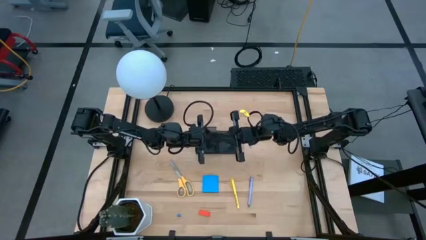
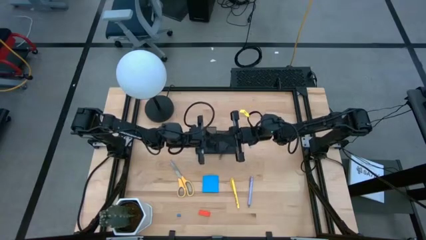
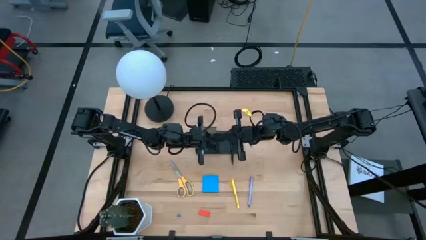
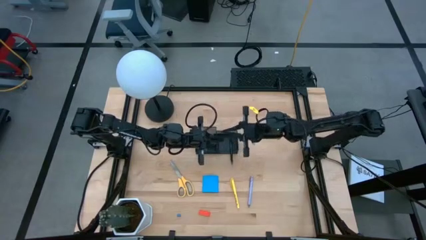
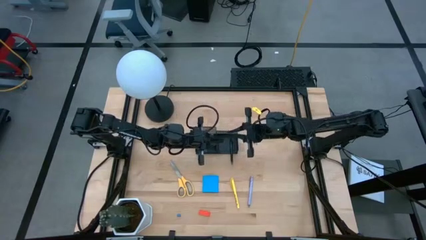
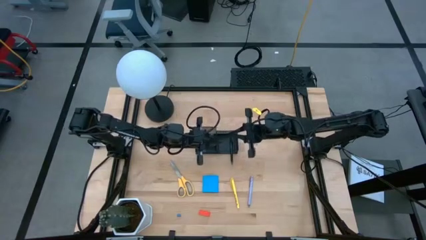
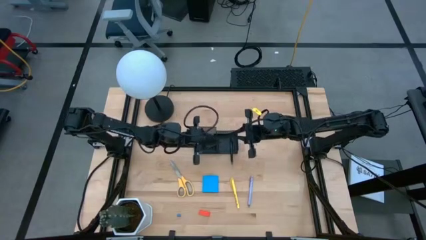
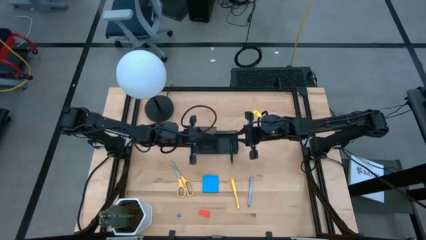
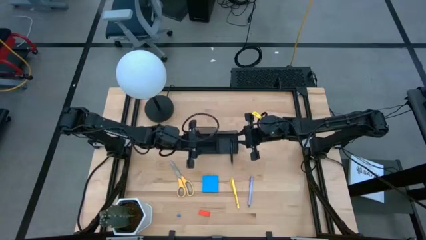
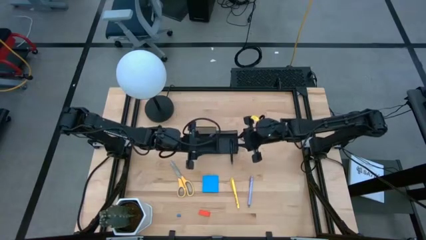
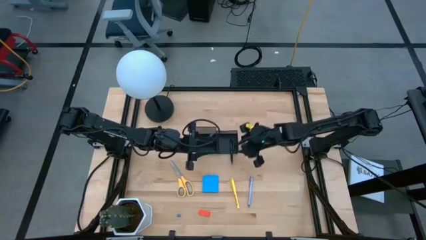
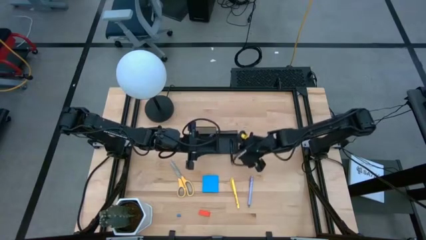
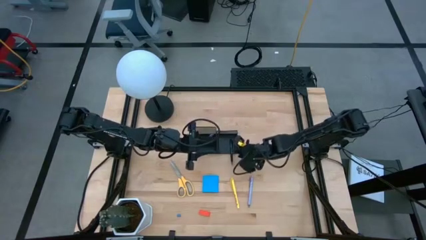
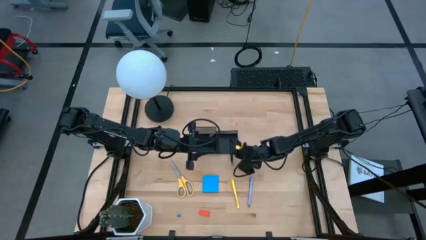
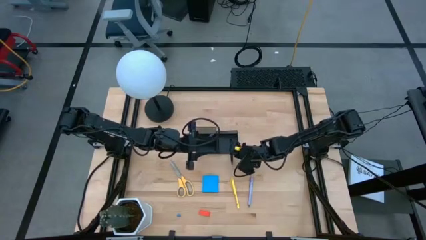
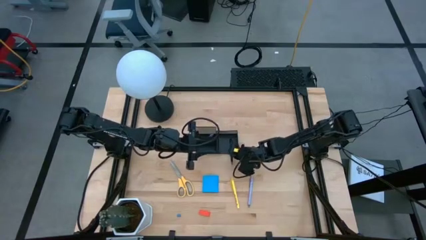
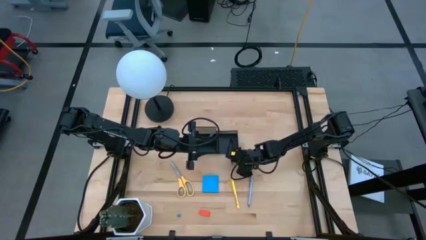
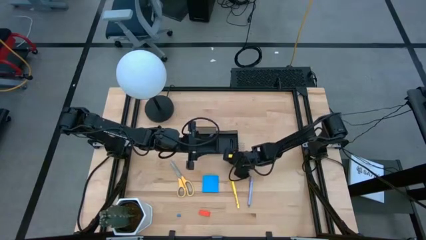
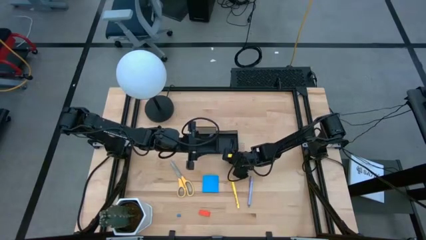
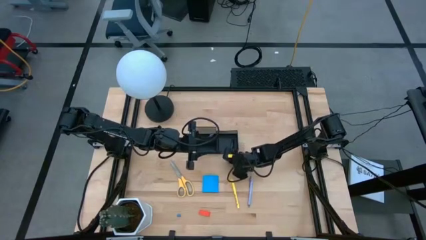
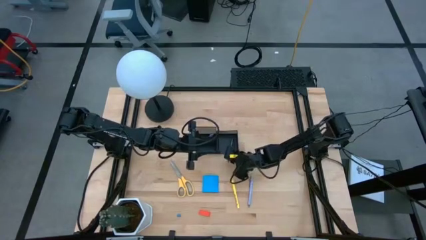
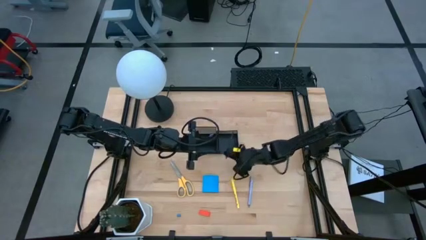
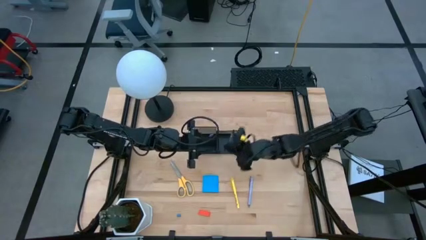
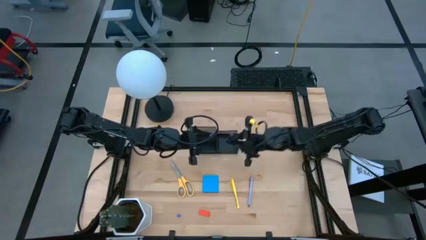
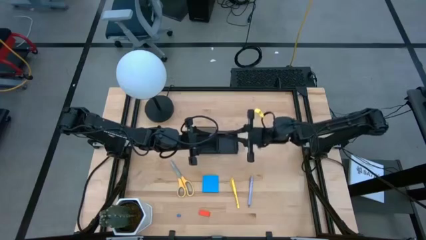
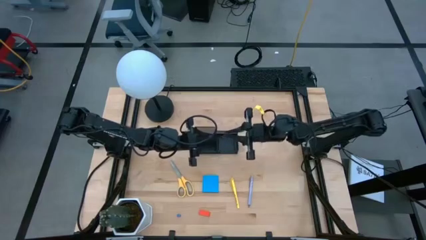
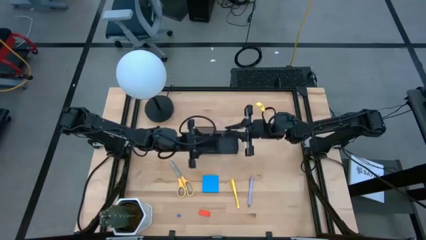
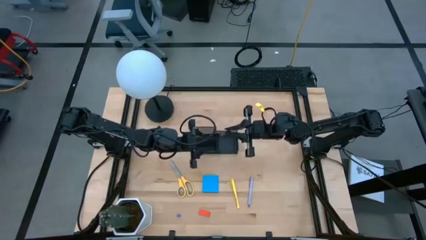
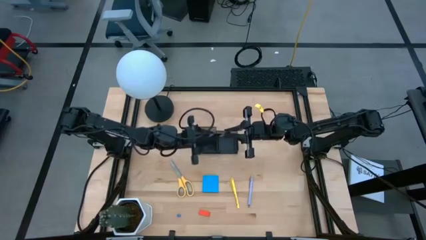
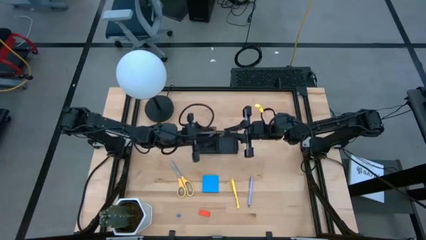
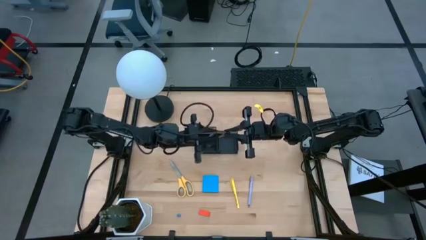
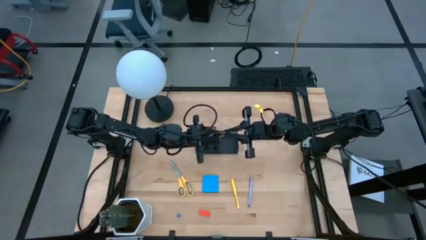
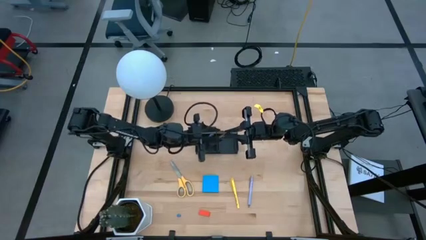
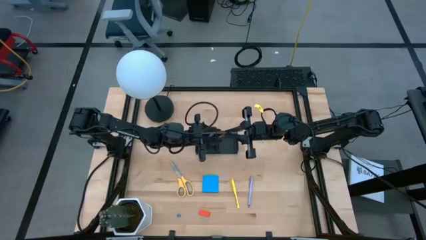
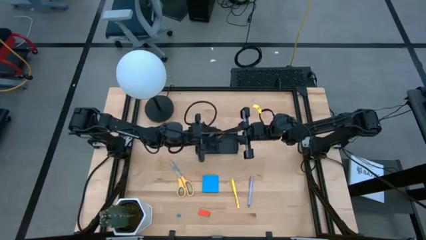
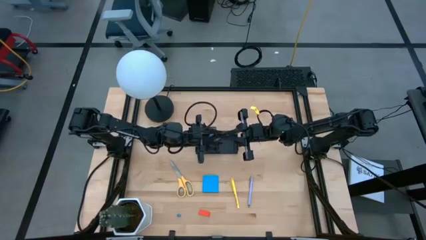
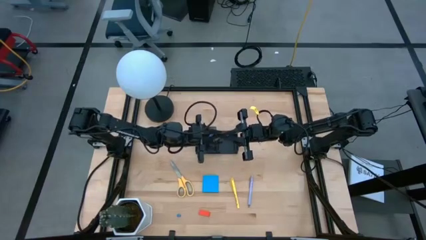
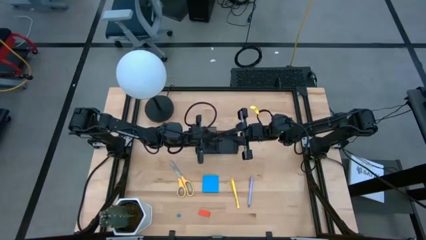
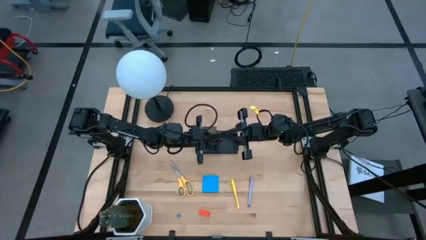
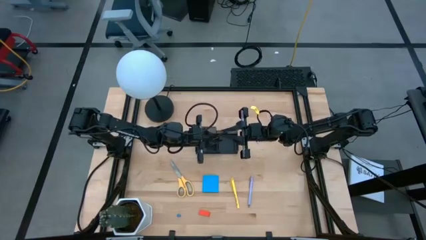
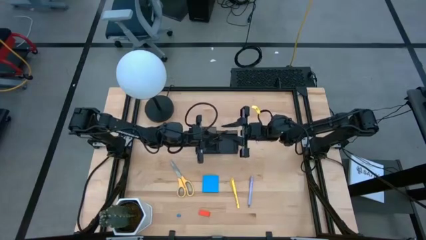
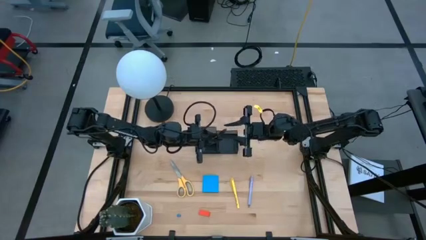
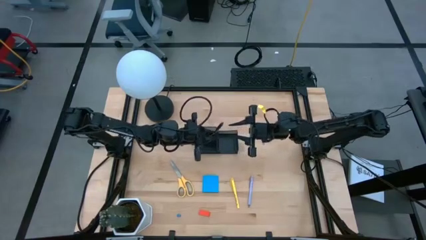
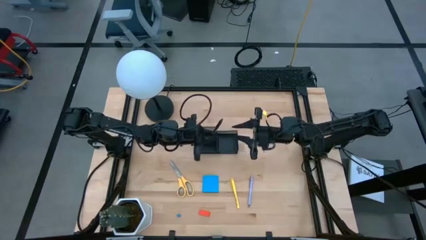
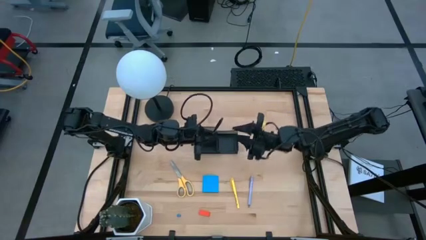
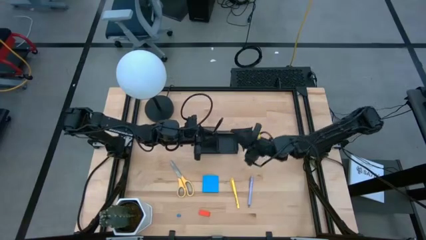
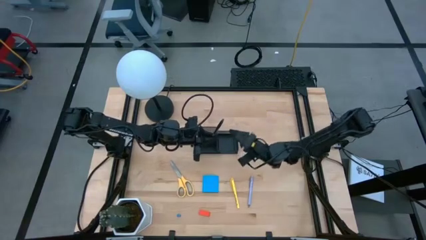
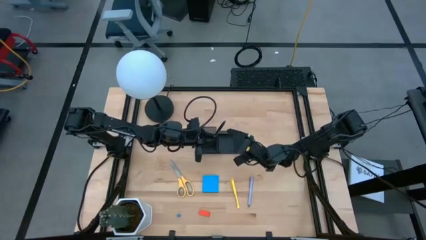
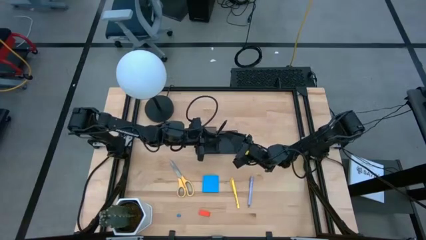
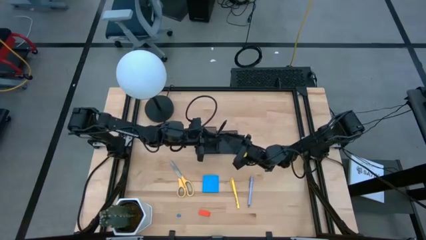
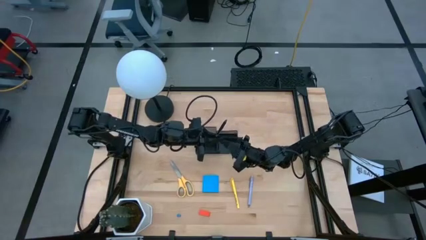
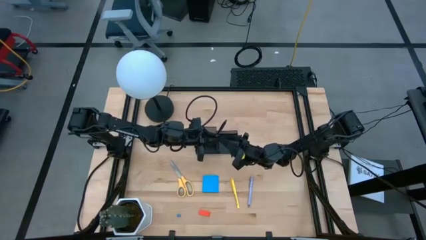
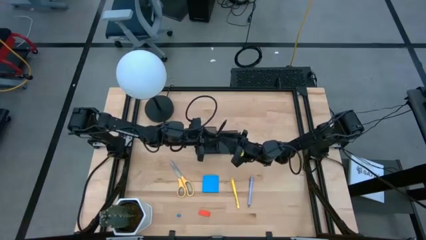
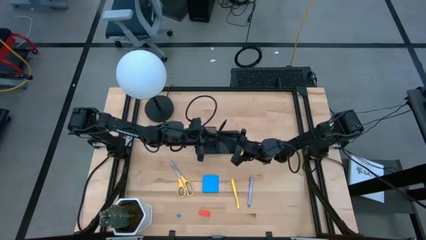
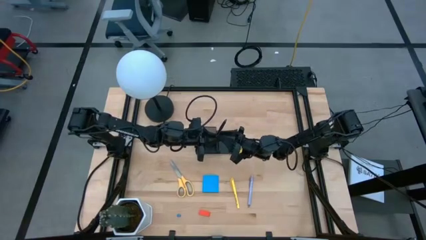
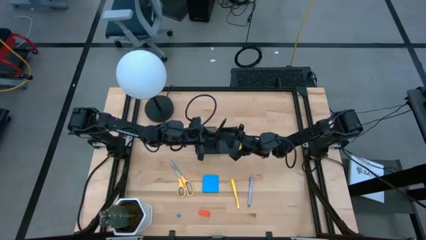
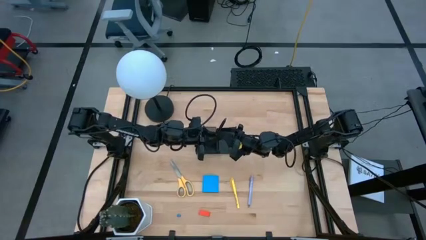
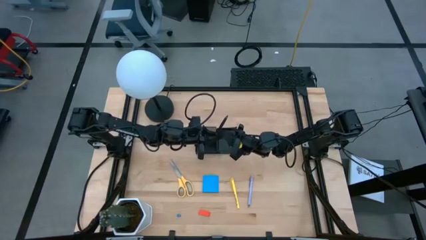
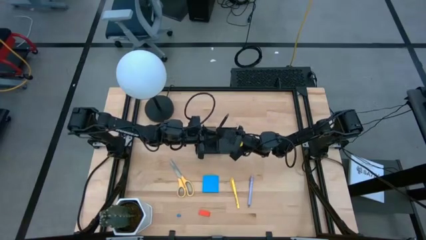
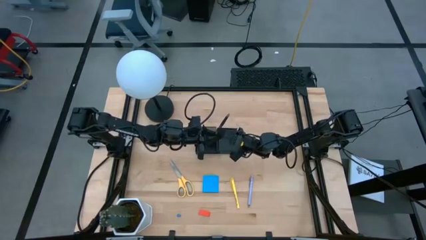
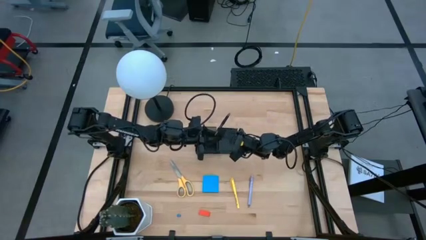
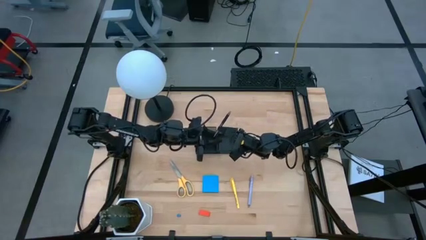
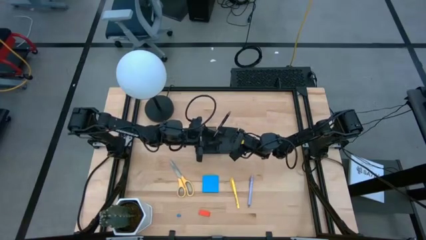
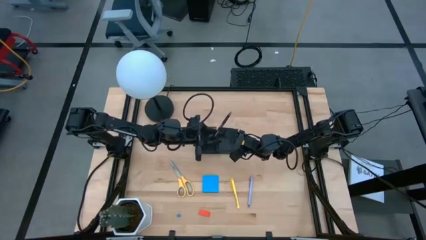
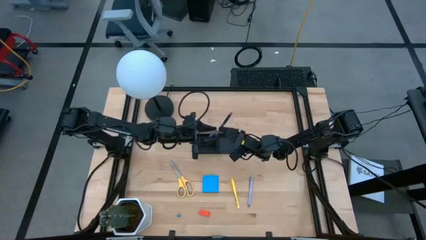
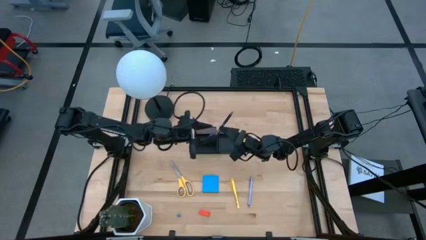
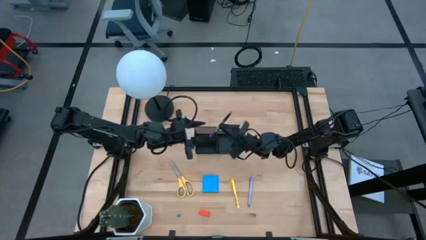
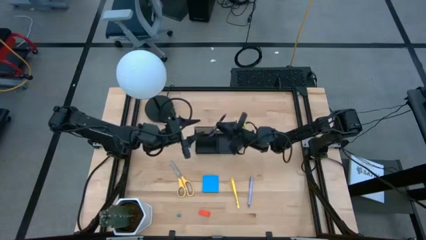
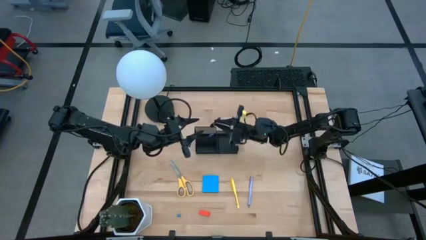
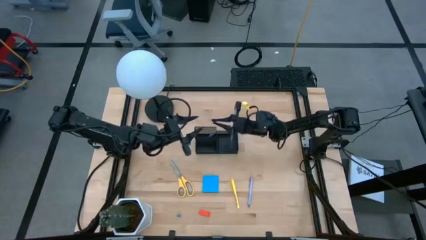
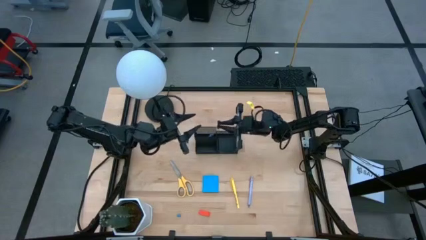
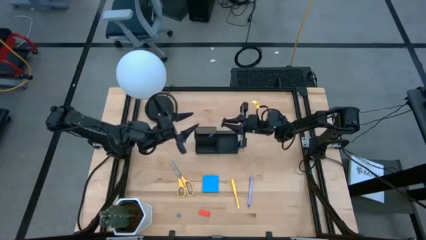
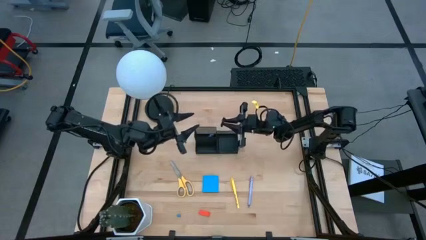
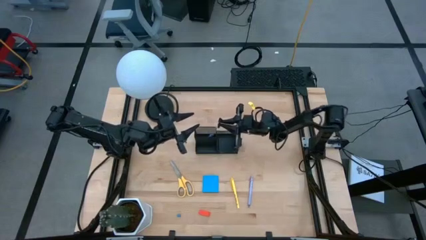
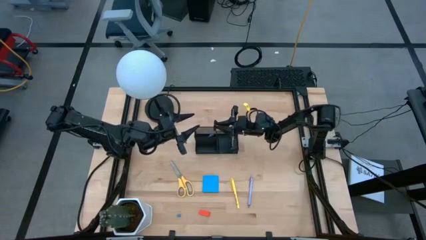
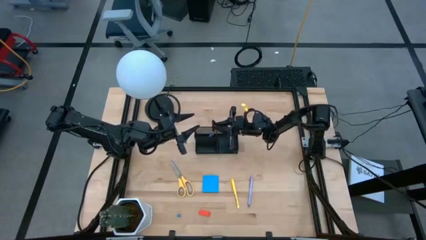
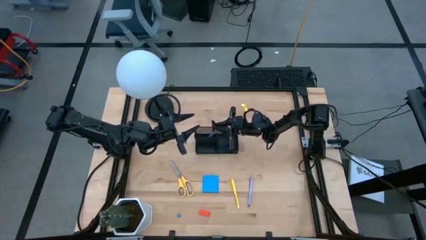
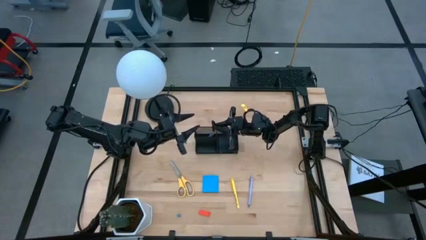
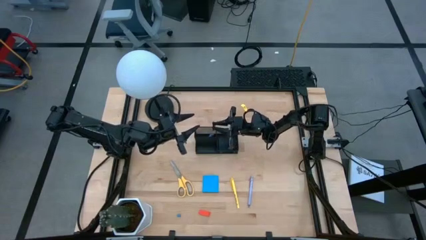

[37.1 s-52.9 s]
Task: Pick and place office supplies into organizer
Put the black pen into the desk organizer

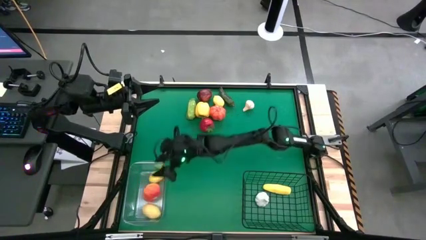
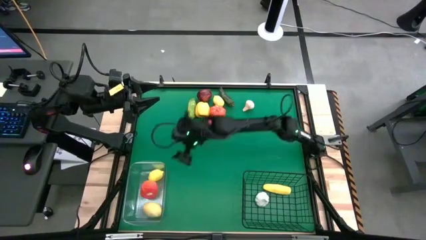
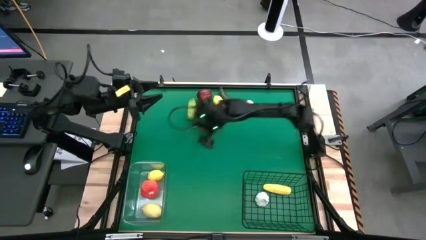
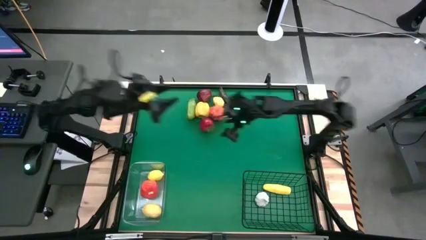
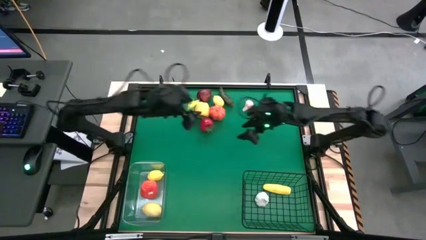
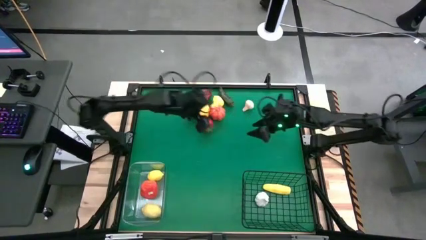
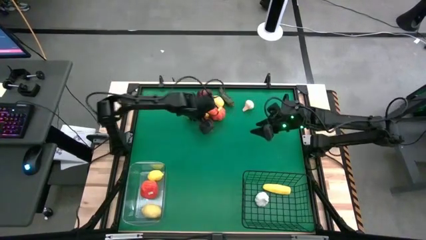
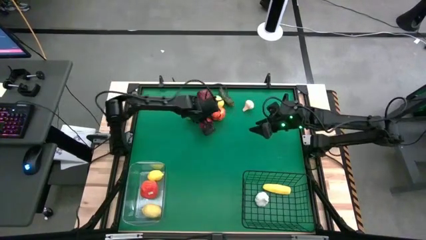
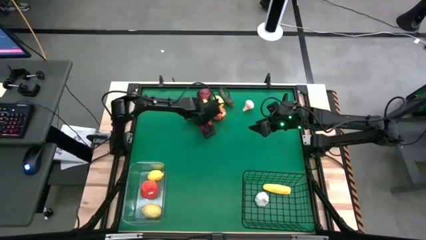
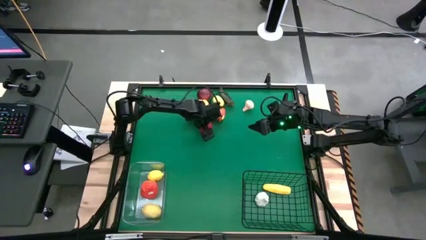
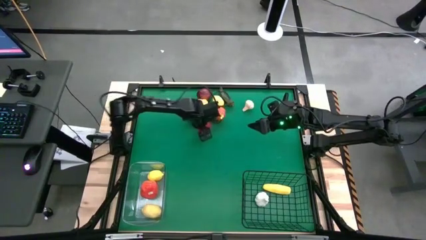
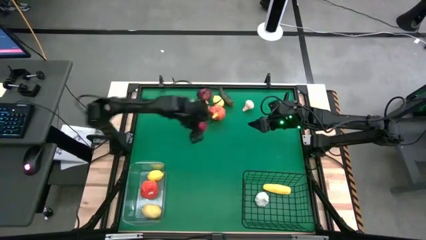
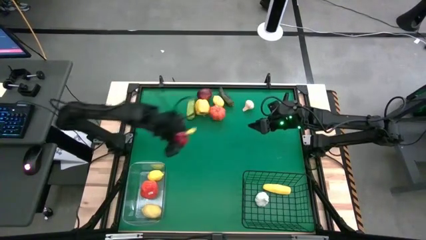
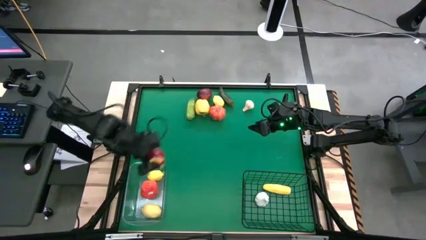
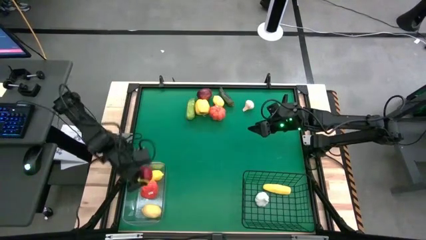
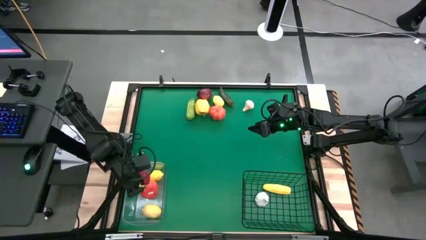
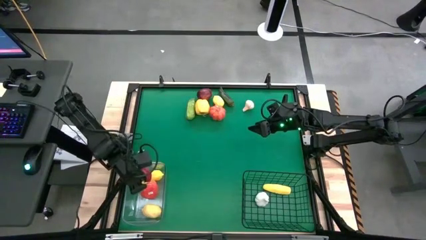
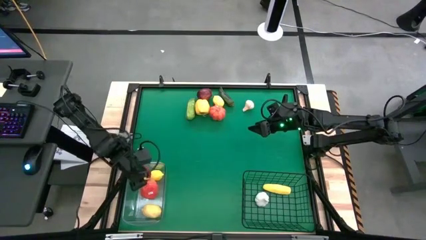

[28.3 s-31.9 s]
Task: Sort produce into baskets
Put the tomato into the transparent bin
